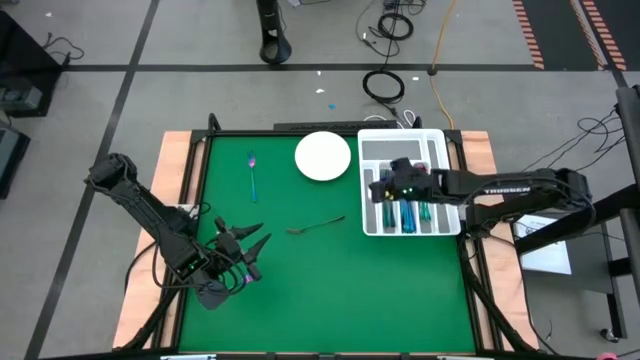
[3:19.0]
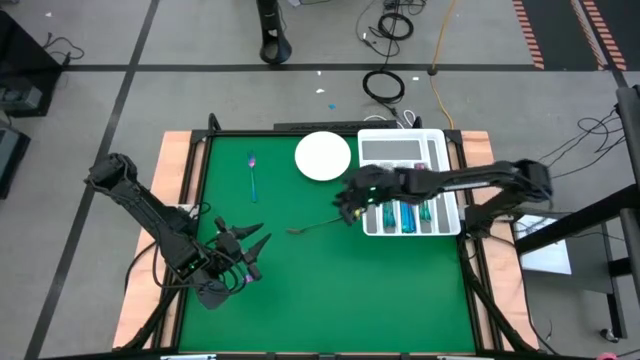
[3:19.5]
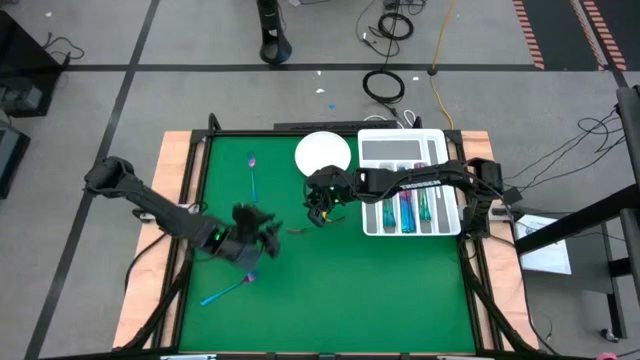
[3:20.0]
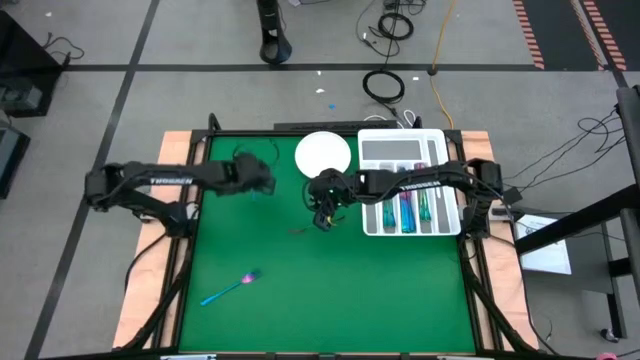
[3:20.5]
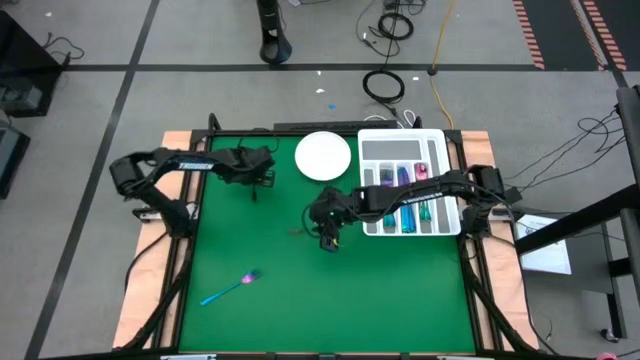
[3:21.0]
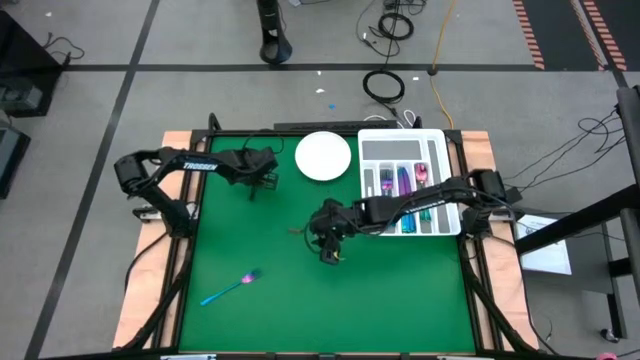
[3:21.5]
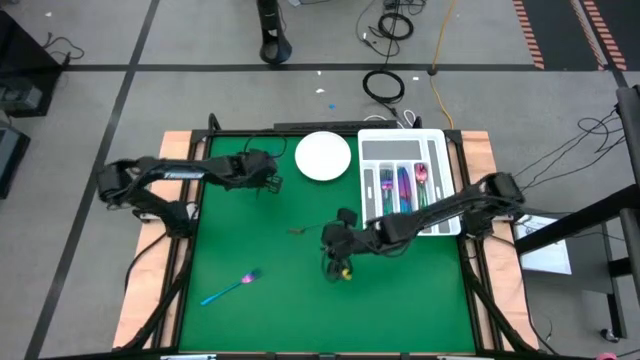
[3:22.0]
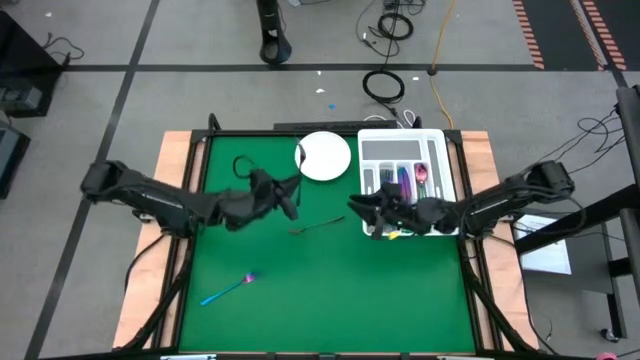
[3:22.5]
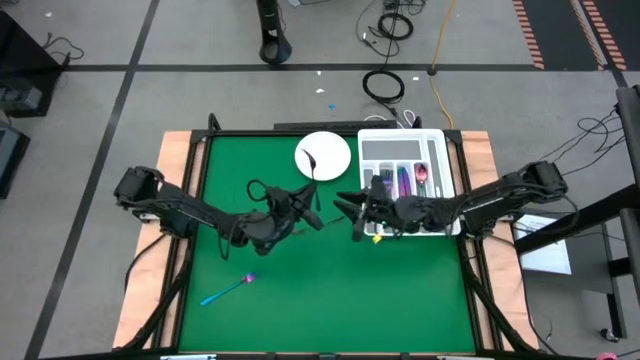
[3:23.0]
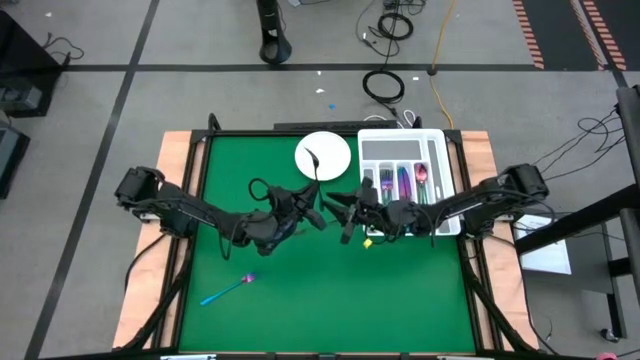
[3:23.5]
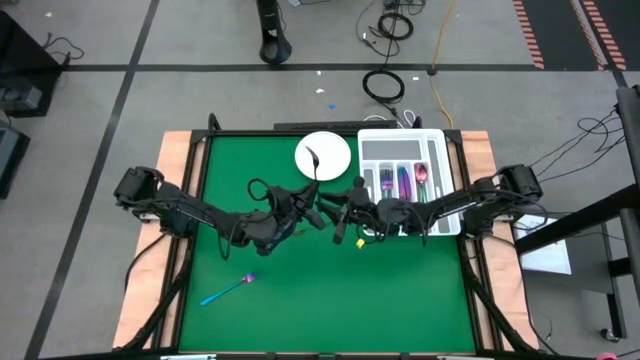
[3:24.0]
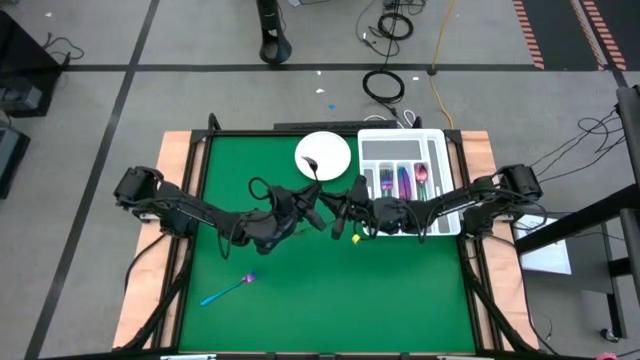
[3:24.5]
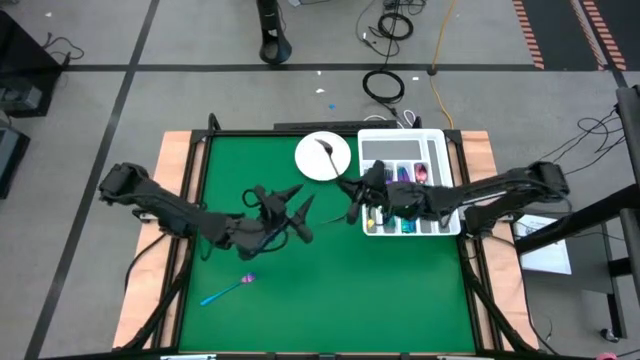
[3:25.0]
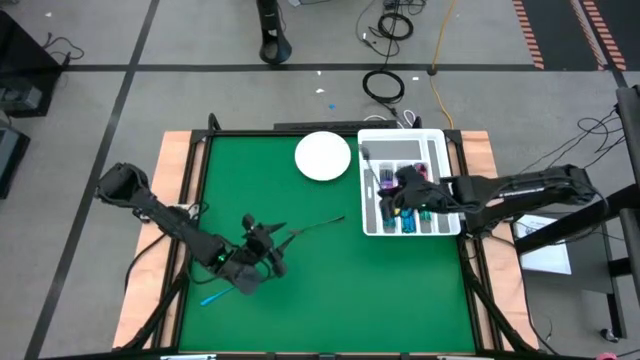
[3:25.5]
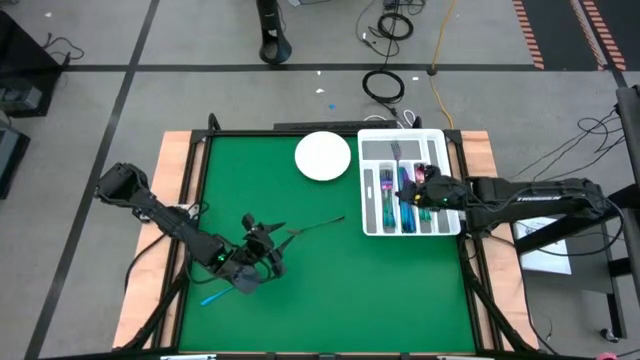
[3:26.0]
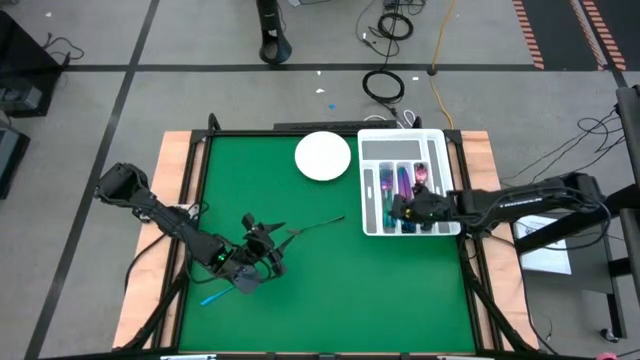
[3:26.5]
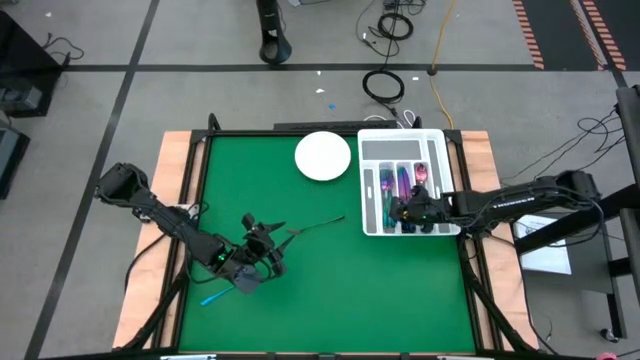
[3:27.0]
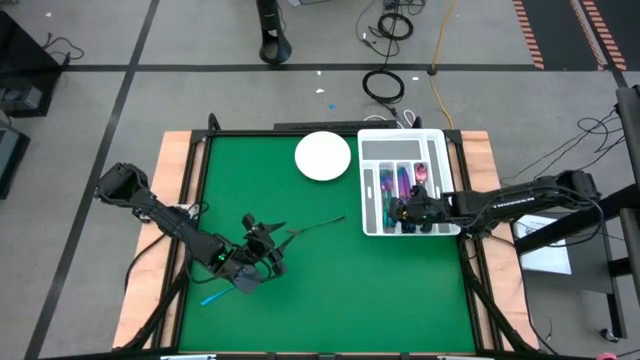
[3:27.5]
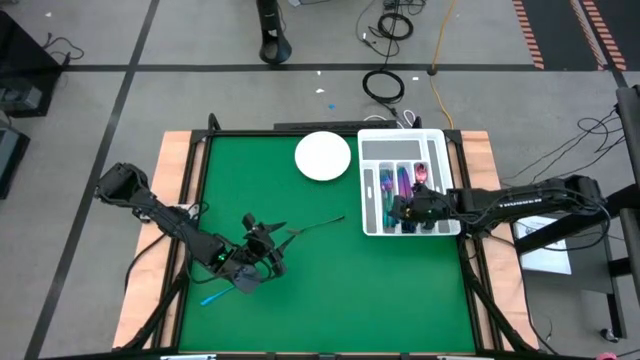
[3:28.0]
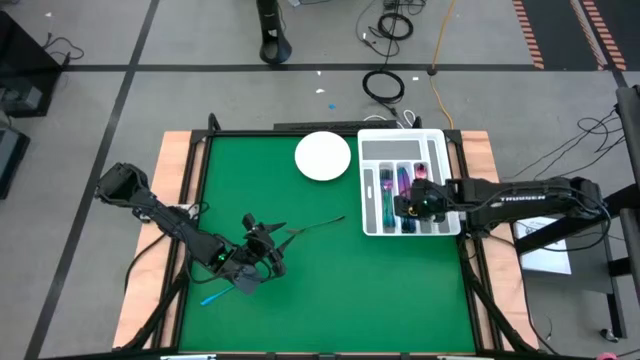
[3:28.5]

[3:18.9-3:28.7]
Task: Sort silverware
Put the iridescent fork into the white silverware tray

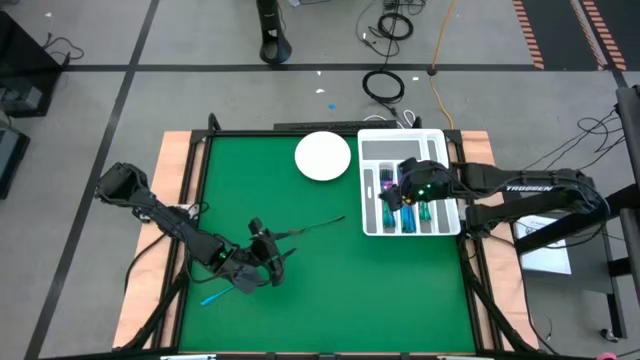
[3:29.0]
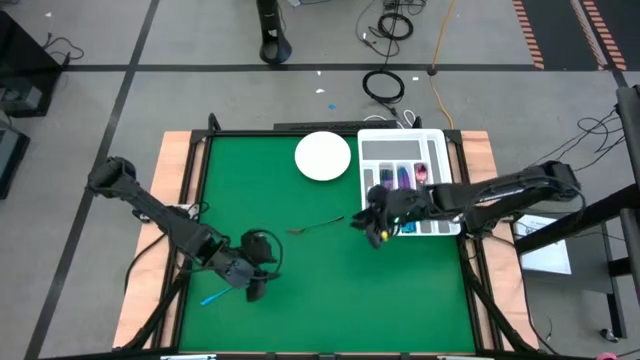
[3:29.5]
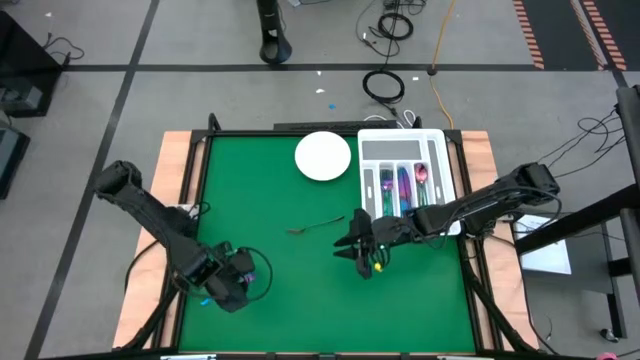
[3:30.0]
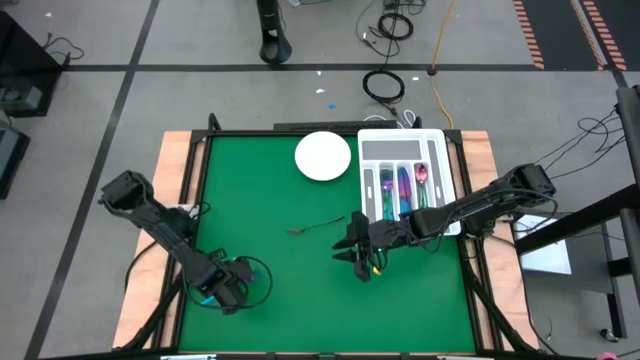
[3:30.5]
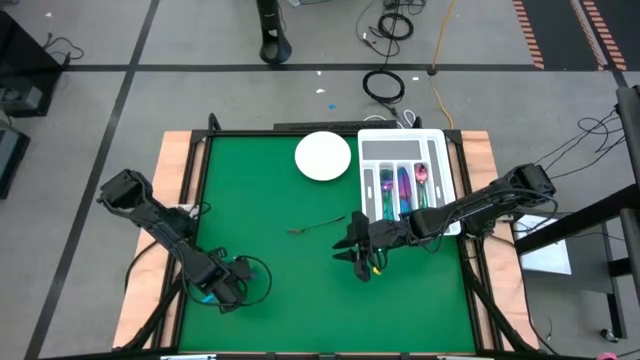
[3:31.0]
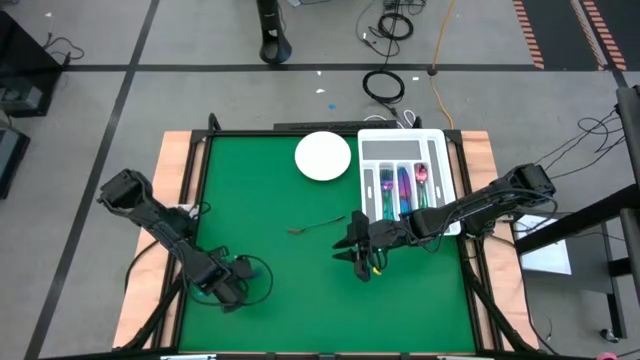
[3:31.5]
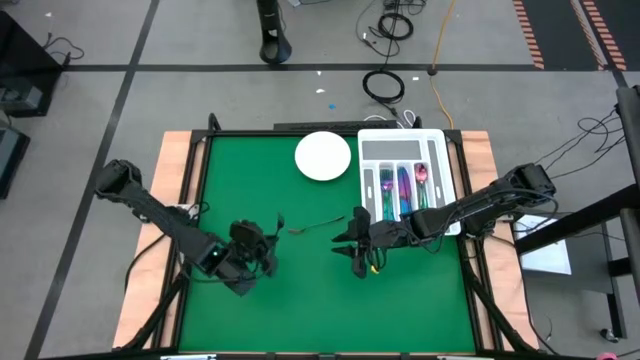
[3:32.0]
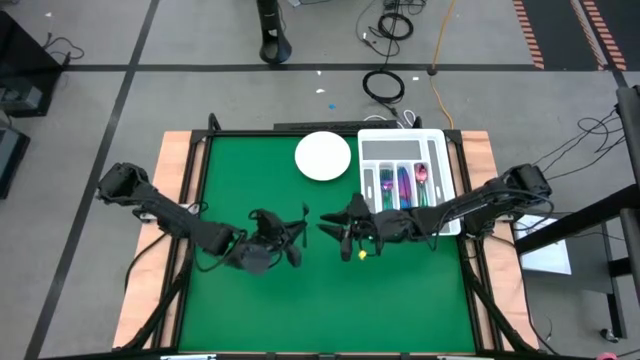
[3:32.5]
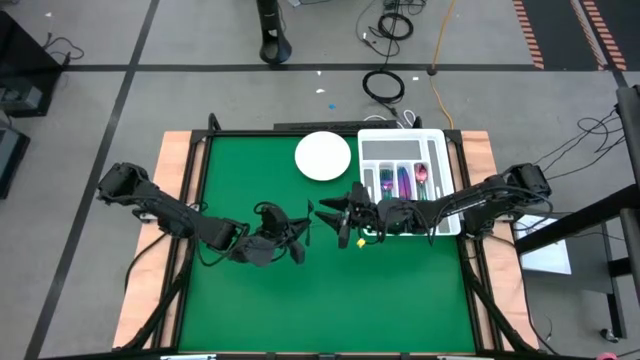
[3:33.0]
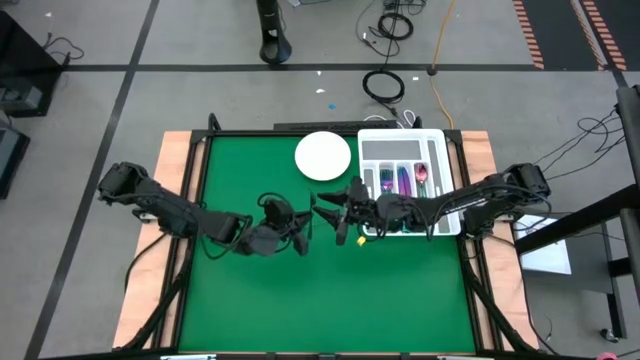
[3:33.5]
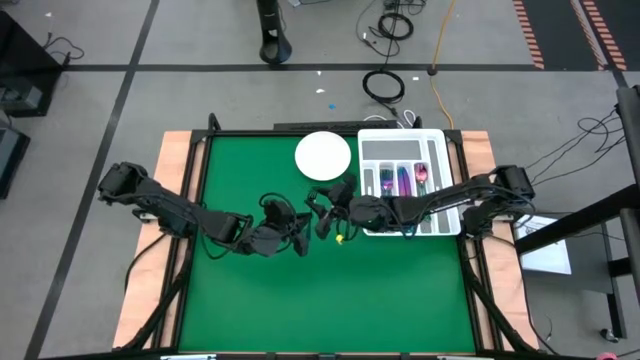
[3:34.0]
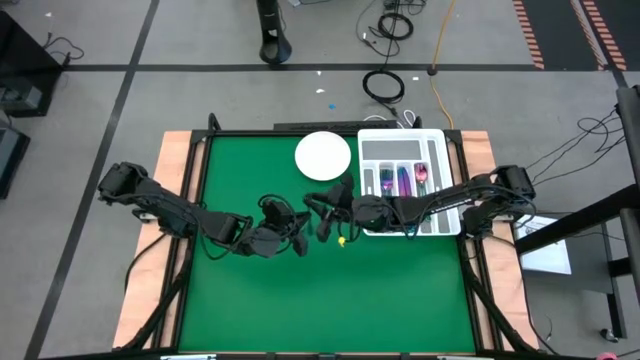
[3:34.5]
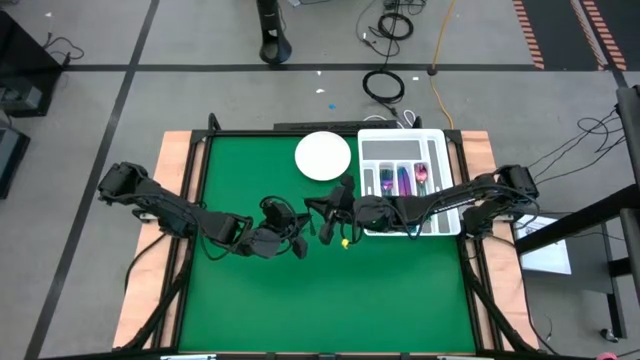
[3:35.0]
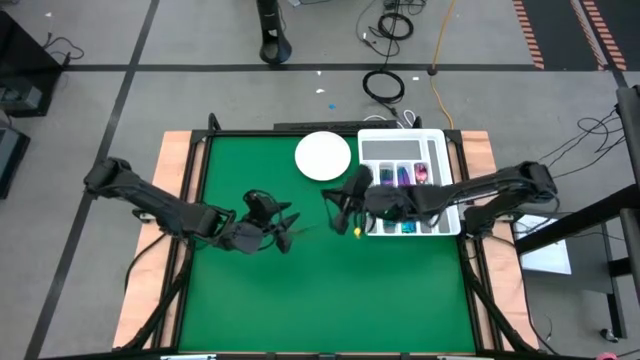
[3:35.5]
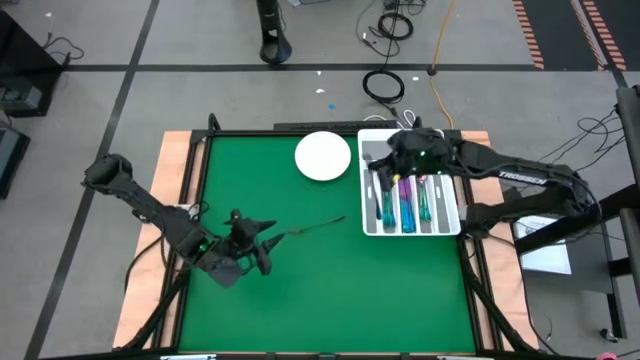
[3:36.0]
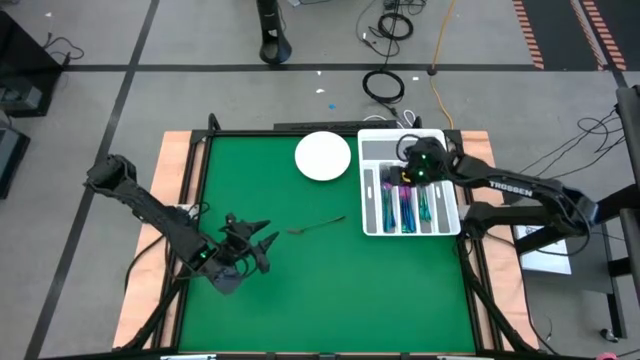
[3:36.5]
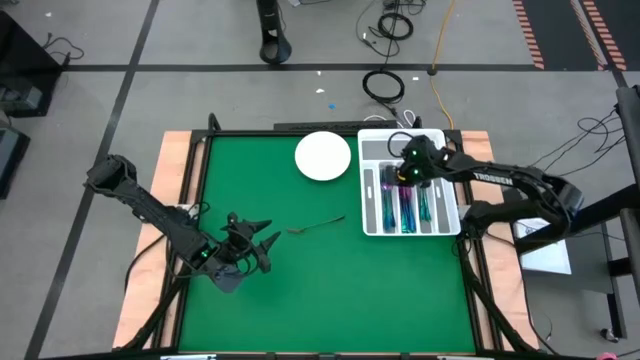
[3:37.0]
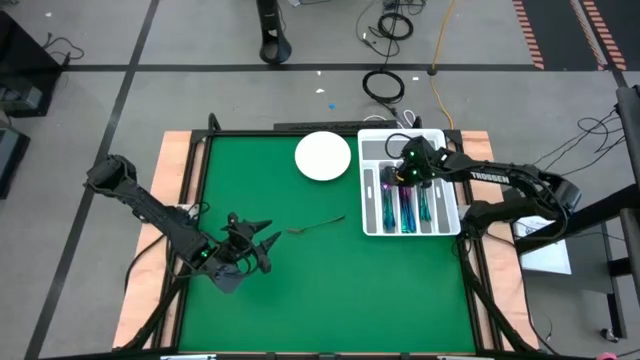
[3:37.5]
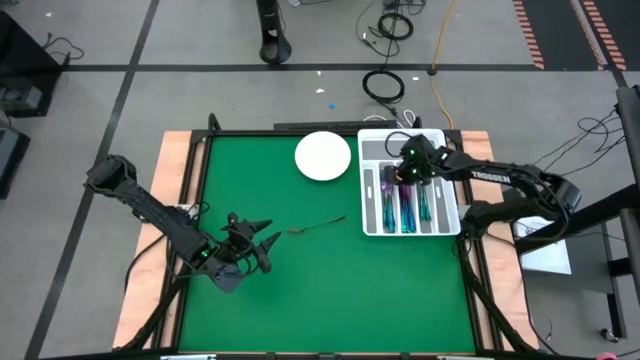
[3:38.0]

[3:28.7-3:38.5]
Put the iridescent fork into the white silverware tray

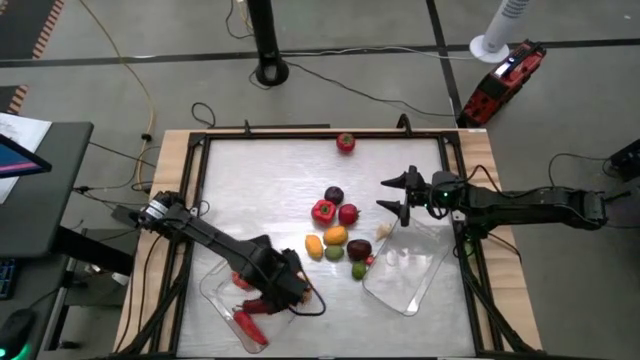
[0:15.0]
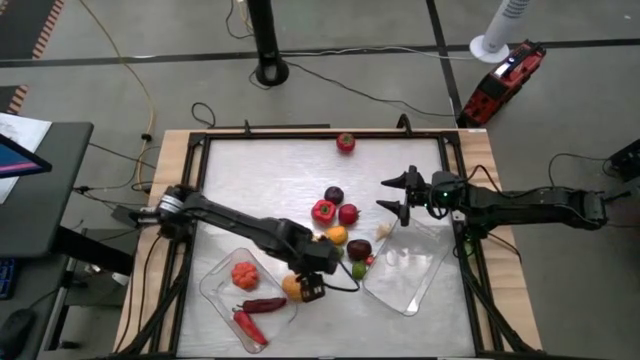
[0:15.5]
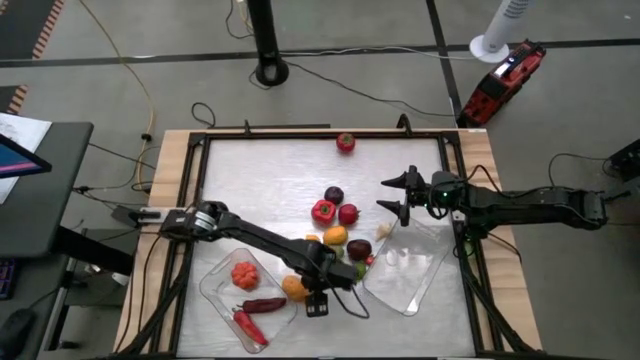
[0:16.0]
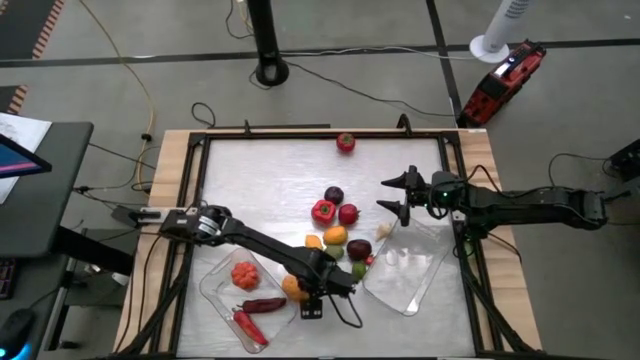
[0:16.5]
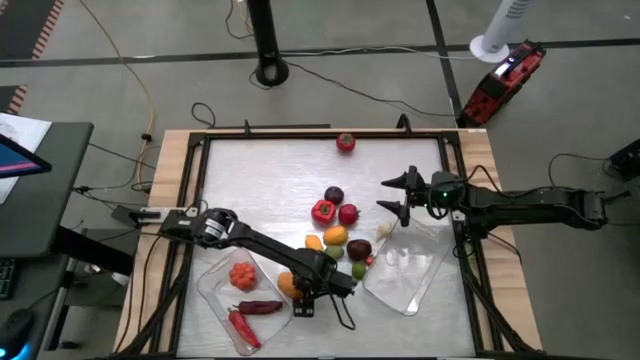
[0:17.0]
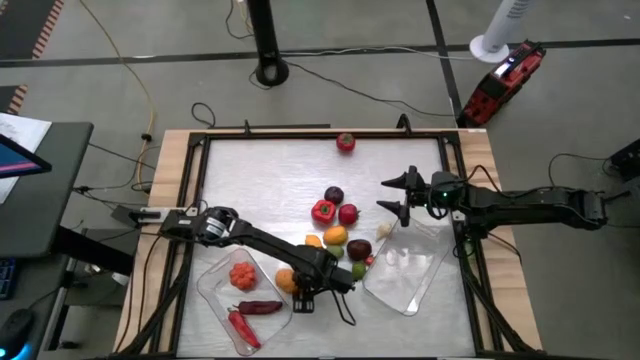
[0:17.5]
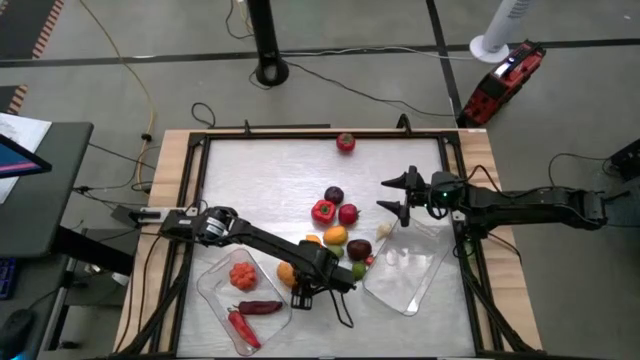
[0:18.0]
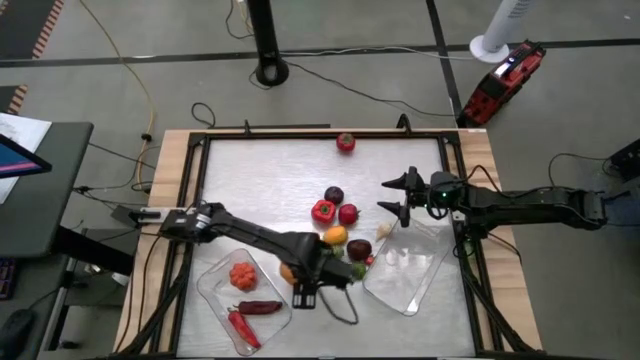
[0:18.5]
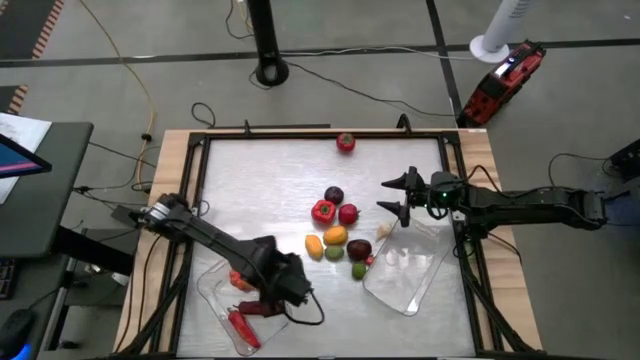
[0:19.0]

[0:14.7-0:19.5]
Task: Sort produce into baskets
Put the potato into the left transparent bin
